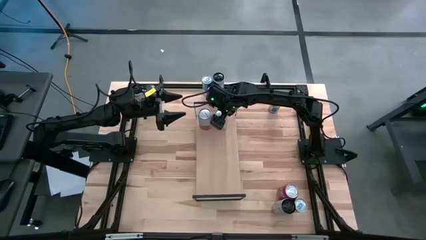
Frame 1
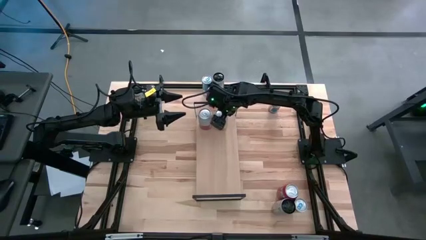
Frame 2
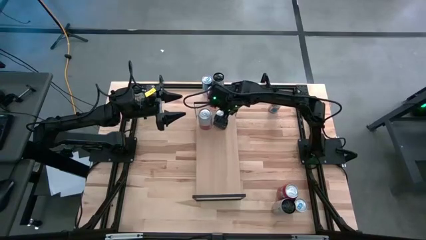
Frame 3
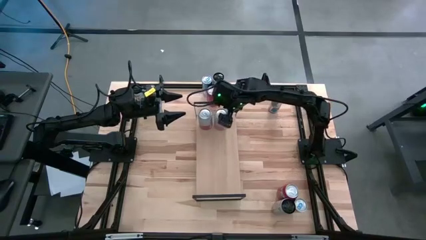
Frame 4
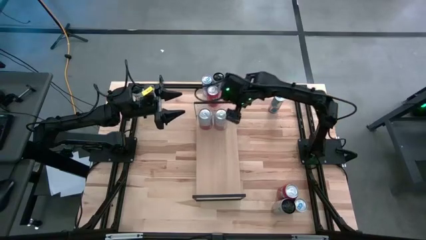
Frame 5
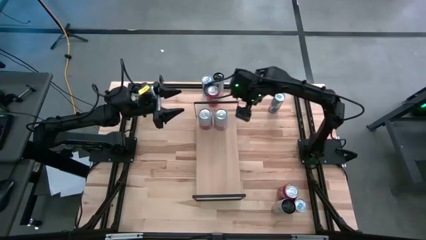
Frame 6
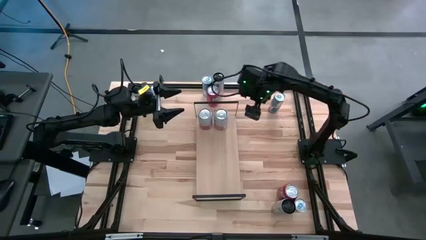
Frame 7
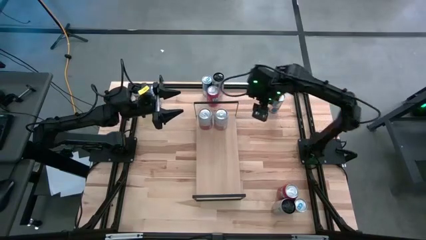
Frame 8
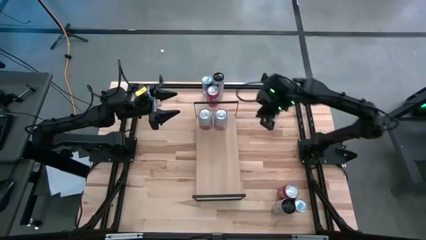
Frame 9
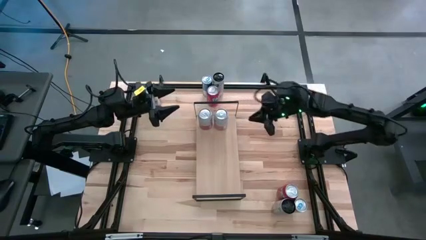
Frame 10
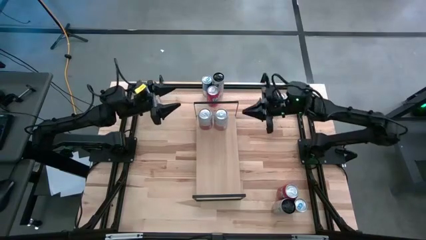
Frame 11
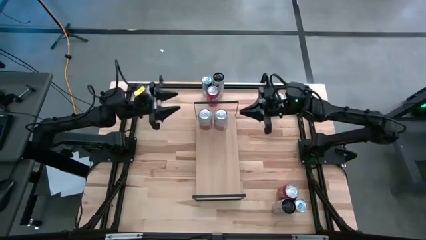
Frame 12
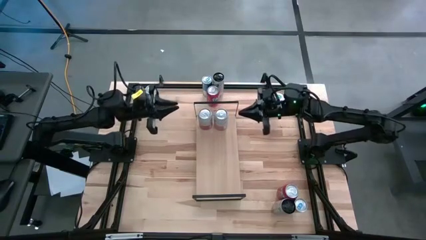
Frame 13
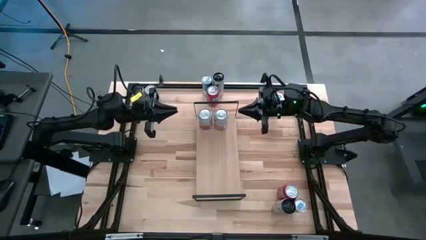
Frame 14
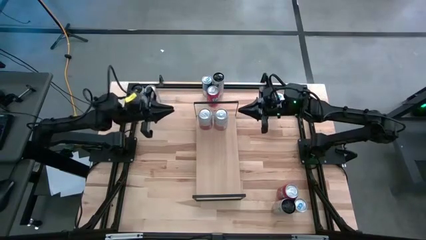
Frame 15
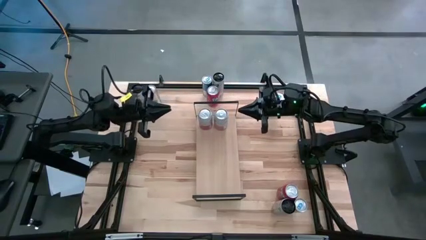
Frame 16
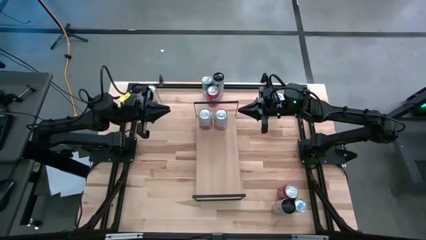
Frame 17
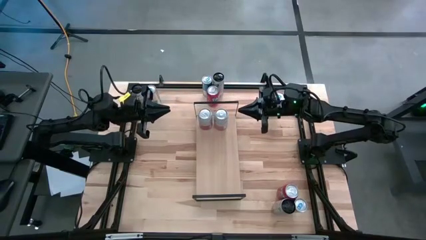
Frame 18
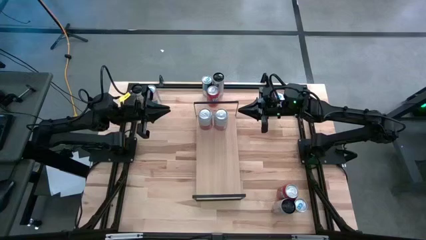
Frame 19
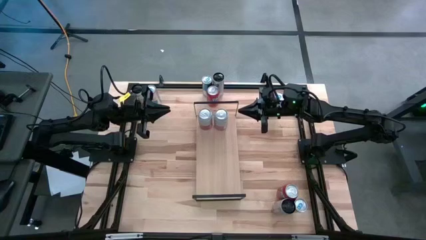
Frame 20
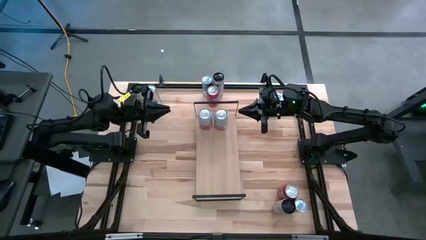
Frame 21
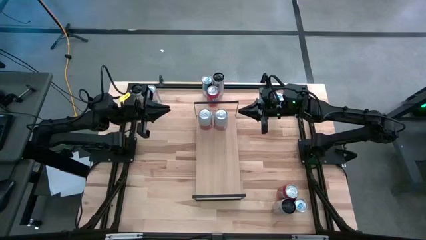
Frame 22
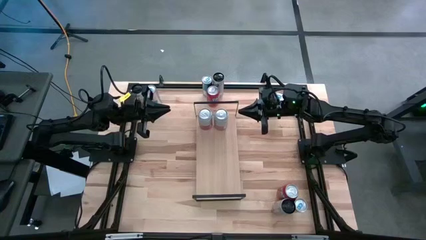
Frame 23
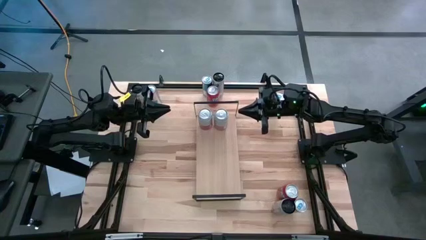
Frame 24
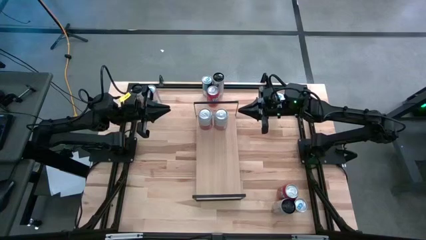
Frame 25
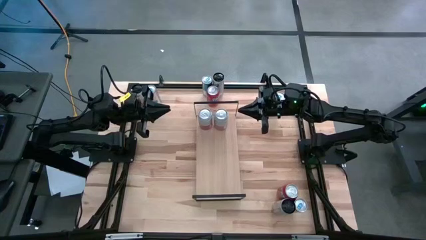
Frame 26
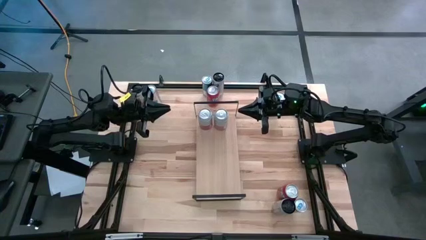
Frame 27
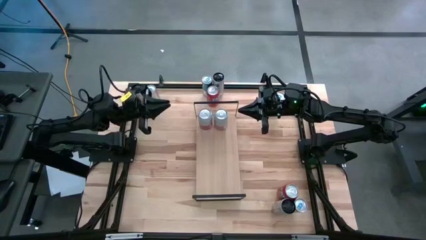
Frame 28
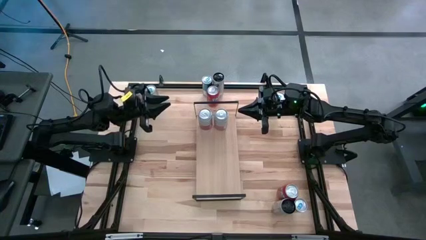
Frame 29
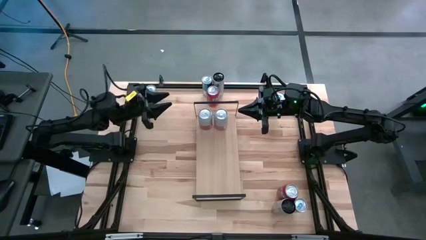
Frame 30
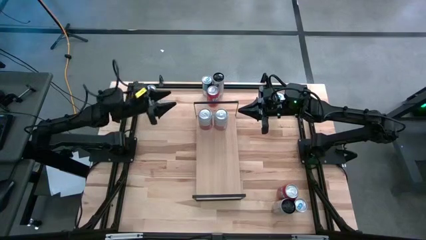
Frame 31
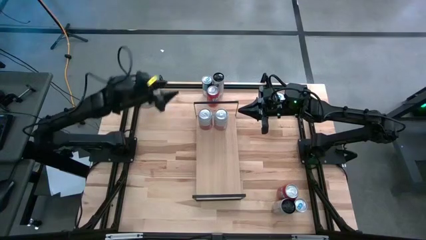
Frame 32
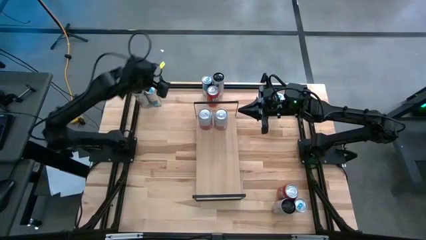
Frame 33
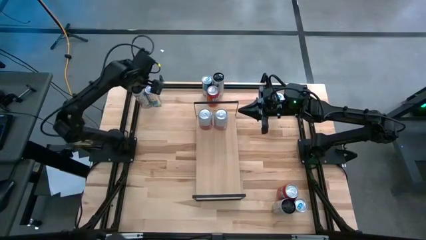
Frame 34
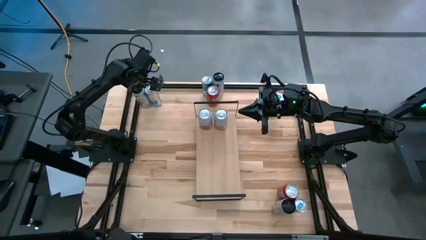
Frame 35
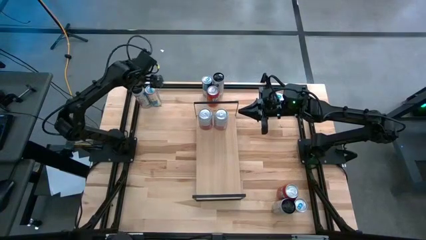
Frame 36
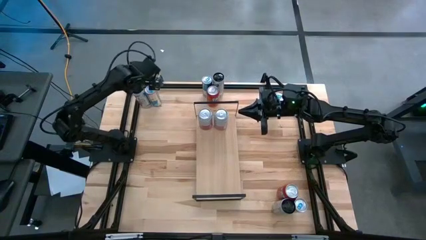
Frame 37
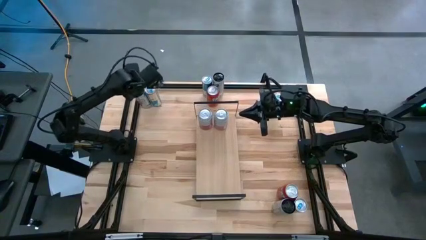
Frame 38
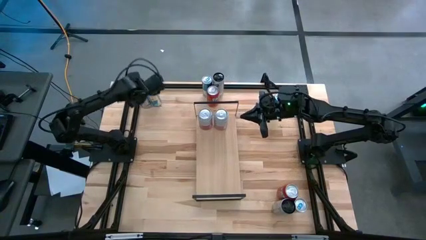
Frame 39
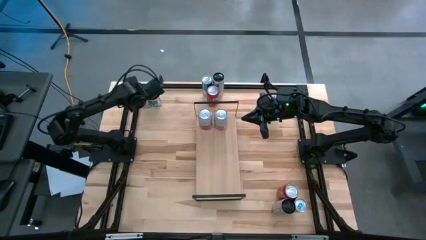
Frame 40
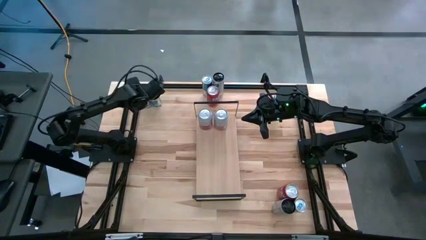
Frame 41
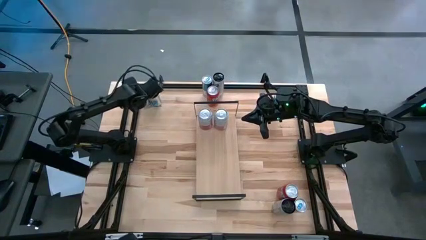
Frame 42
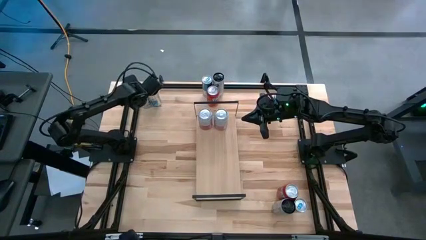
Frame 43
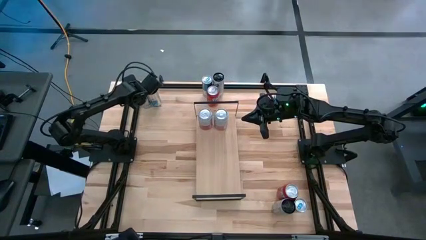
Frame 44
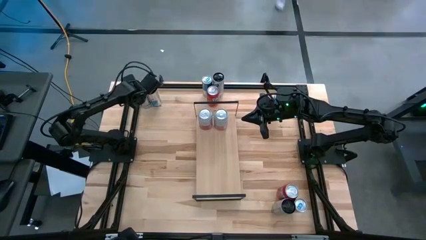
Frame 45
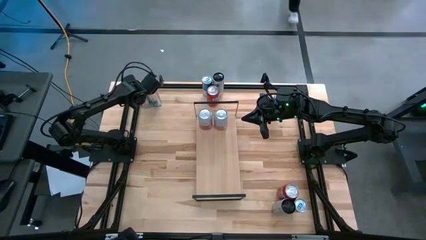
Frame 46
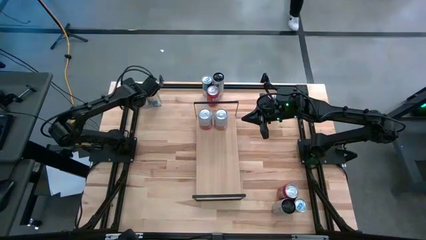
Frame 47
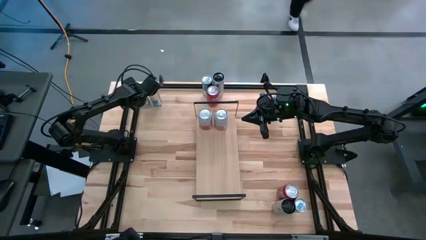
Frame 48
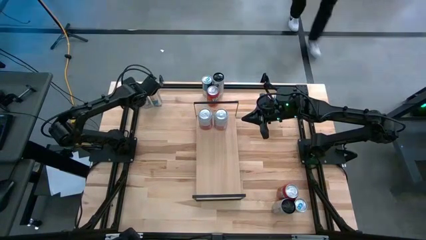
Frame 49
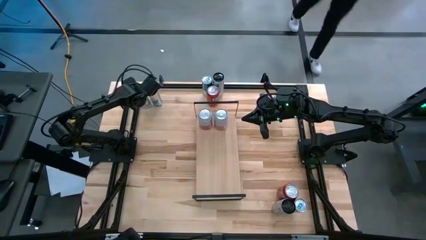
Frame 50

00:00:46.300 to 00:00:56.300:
Task: Place canned beverage on shelf
Put the left white pink soda can on the shelf
